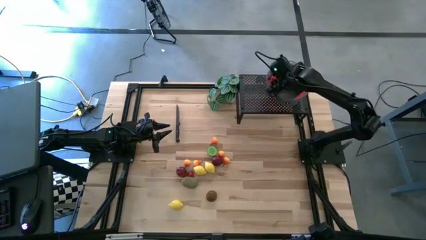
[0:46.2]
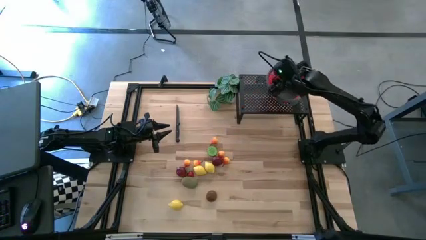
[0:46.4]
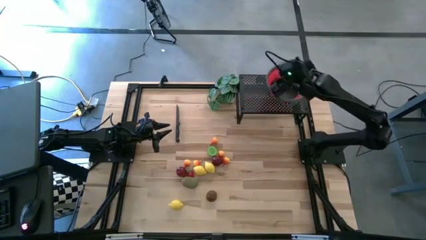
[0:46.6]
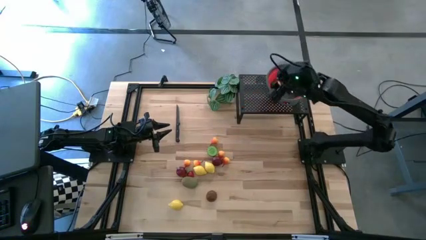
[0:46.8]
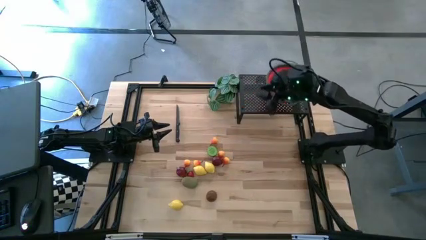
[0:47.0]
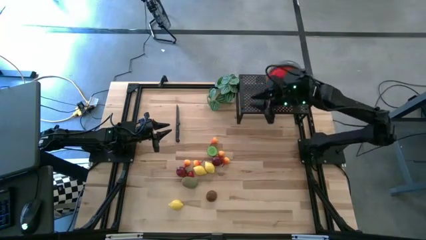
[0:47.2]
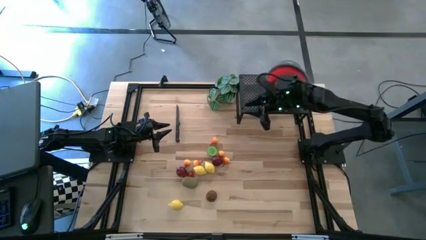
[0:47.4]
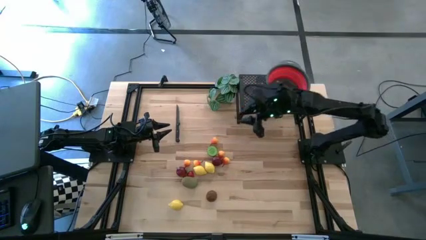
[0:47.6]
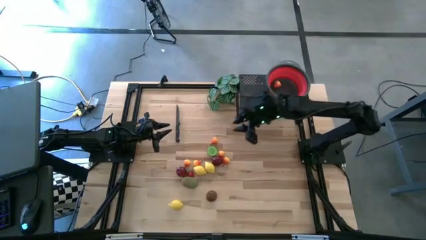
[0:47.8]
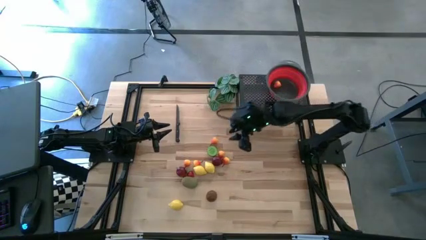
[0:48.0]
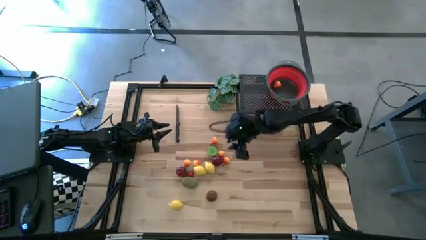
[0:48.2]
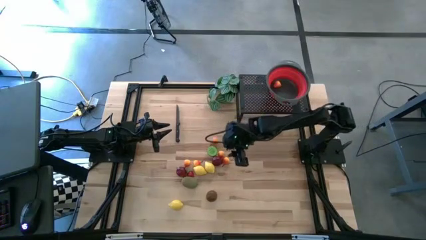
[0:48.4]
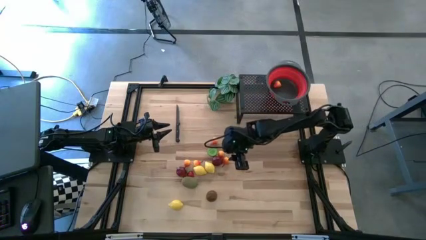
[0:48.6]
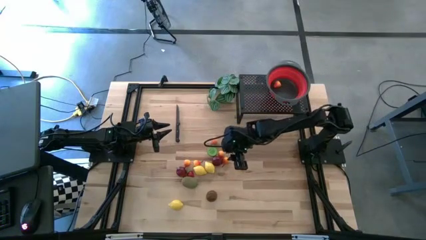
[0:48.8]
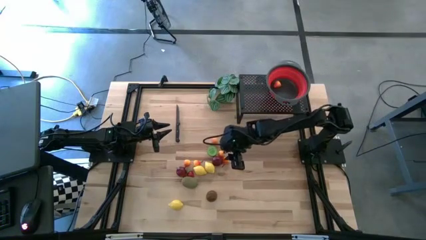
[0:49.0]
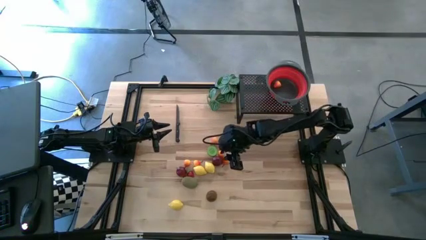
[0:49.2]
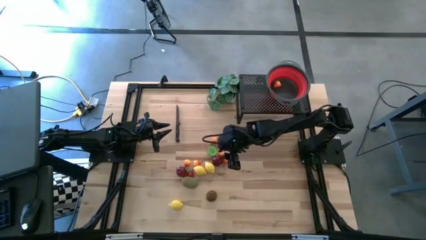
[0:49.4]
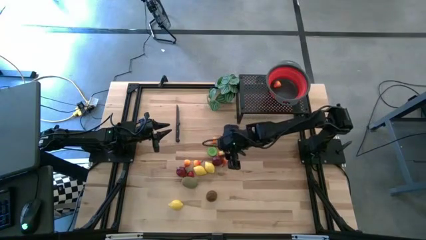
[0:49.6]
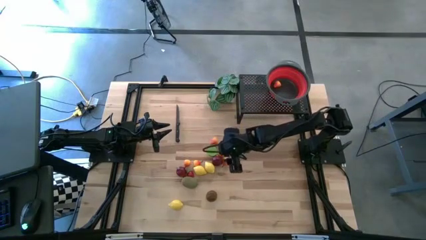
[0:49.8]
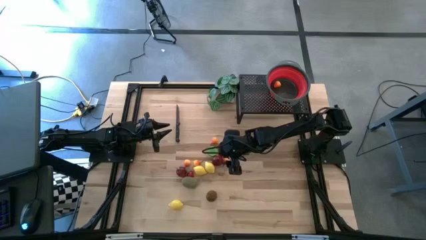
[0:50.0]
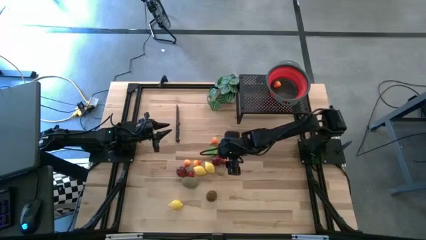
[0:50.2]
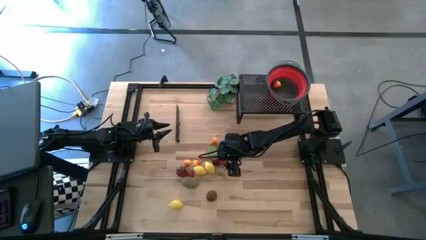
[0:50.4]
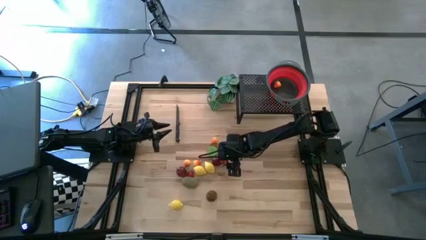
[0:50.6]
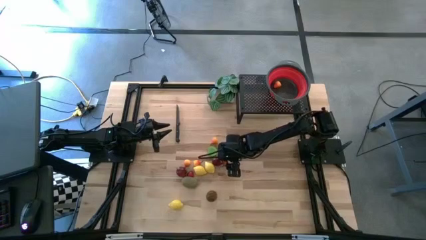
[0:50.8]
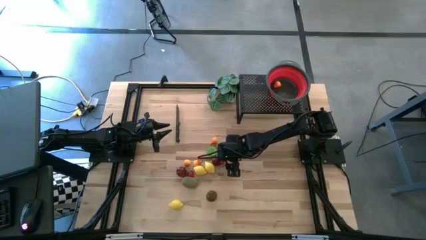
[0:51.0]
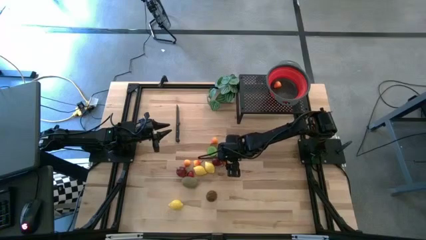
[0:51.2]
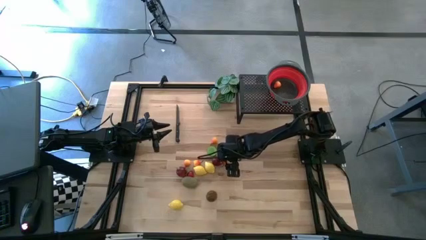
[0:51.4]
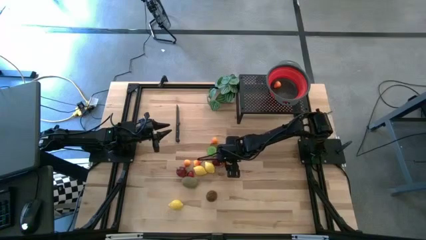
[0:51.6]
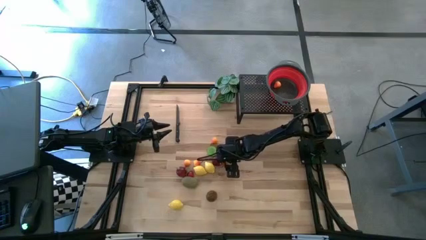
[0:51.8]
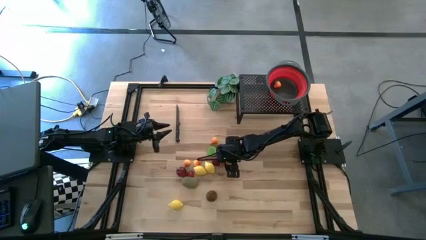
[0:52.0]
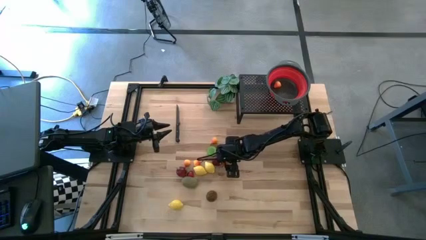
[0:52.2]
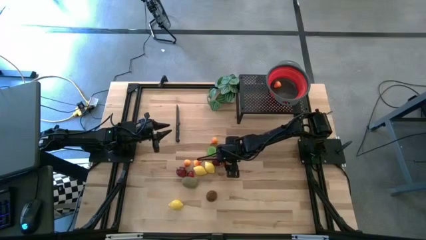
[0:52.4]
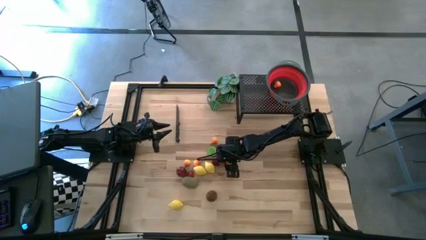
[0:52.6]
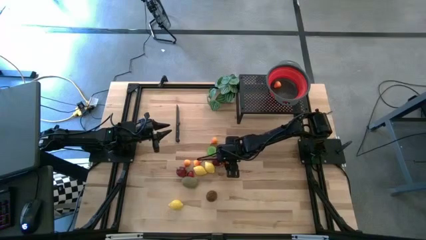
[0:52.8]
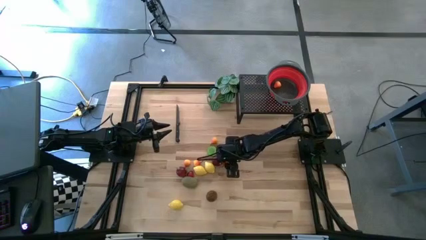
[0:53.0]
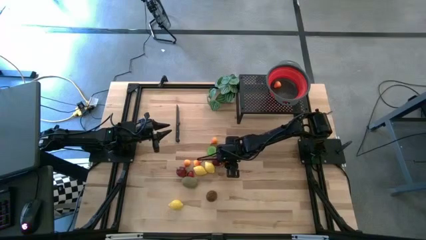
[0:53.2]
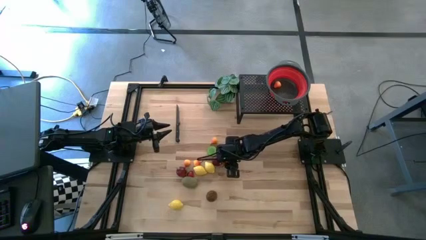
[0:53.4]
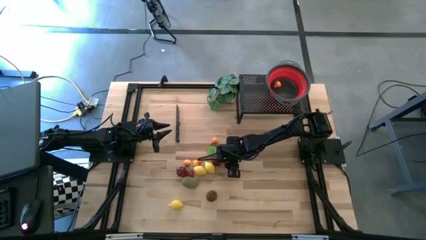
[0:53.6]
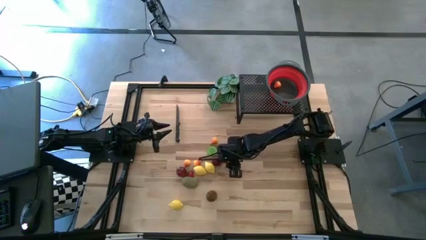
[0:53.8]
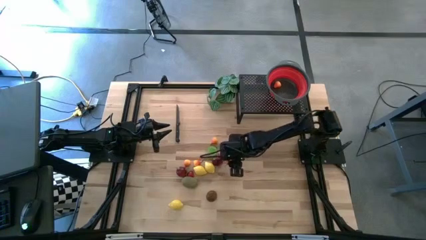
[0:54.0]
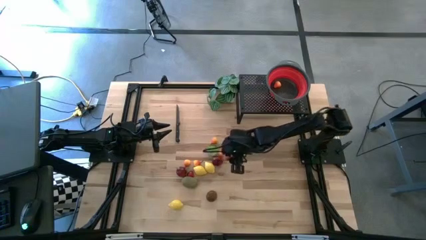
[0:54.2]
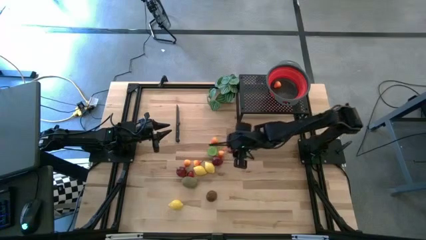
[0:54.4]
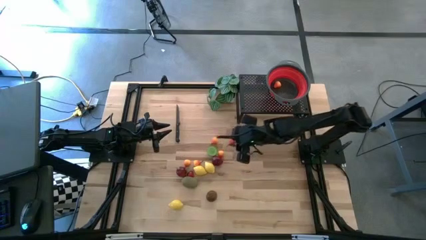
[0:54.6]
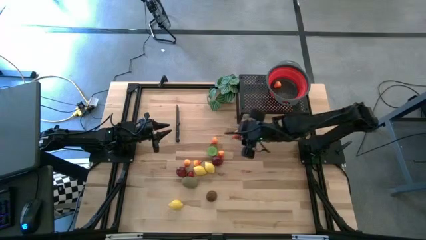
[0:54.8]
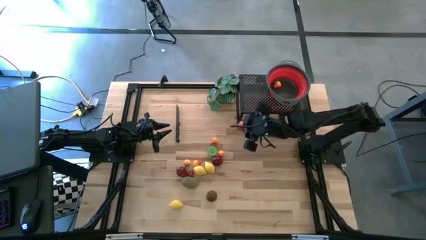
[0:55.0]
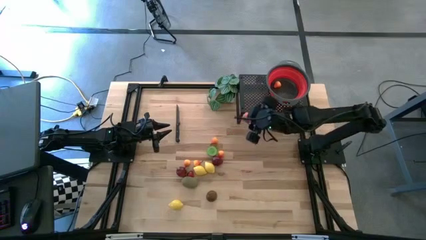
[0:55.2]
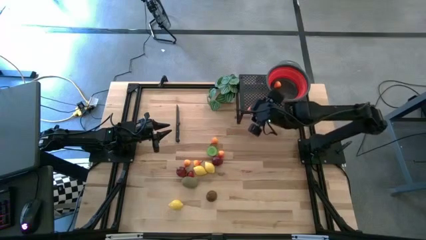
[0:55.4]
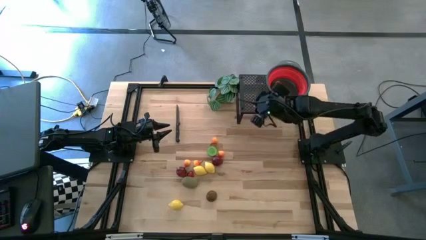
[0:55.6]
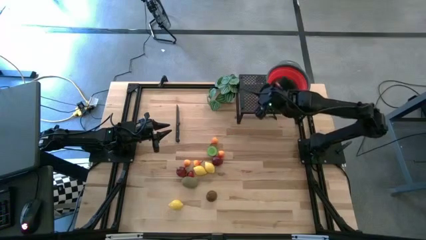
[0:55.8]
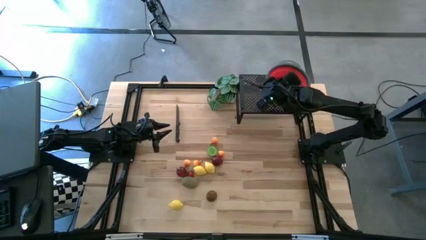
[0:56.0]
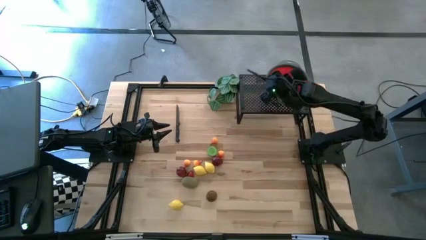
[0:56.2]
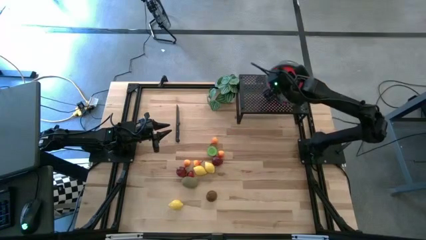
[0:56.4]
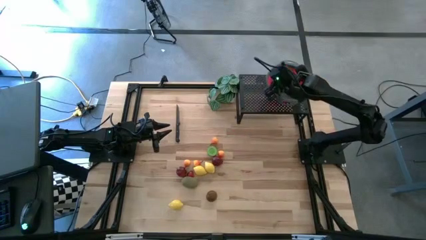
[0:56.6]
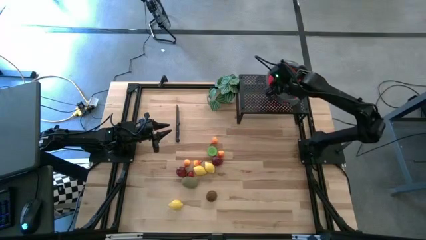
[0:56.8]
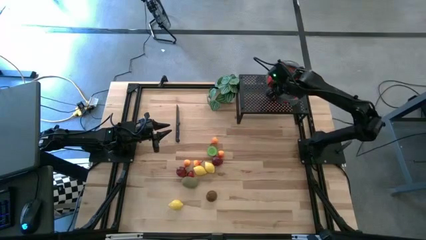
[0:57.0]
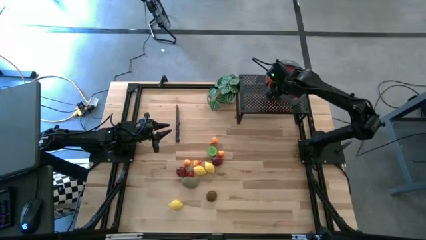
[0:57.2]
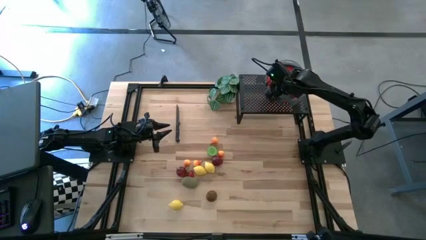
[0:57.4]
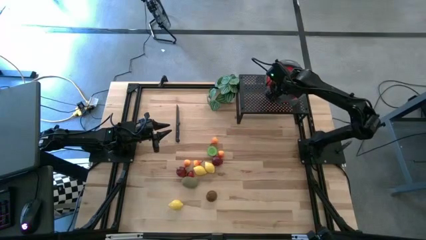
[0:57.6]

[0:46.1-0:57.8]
Task: Pick & Place Fruit
Put the orange pear into the red strainer bowl

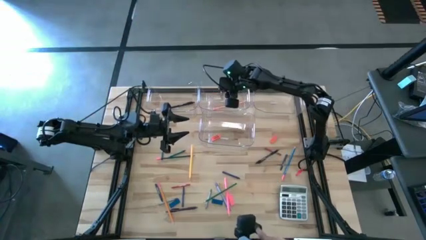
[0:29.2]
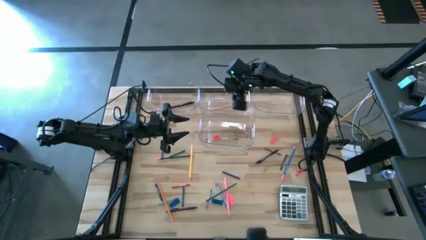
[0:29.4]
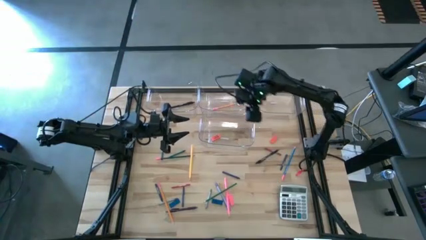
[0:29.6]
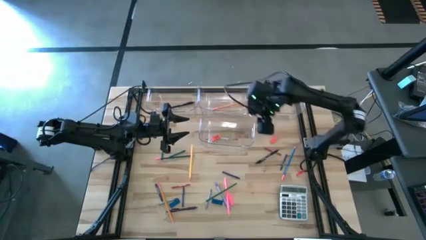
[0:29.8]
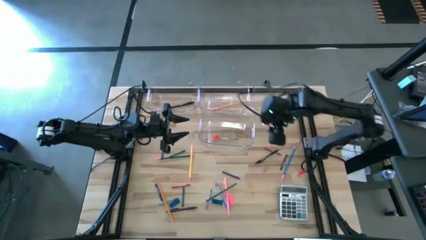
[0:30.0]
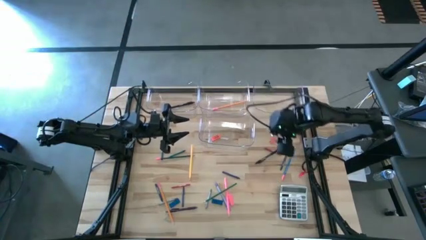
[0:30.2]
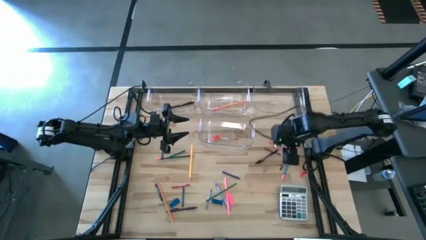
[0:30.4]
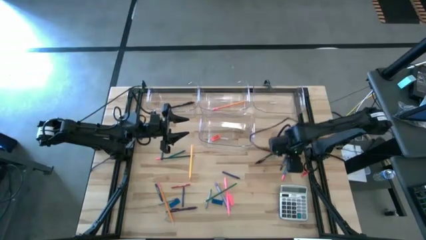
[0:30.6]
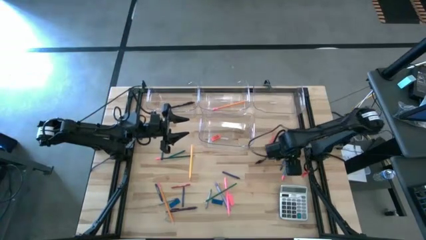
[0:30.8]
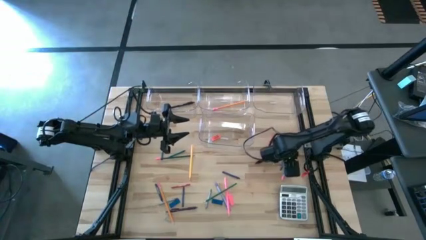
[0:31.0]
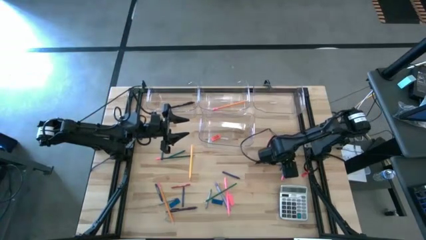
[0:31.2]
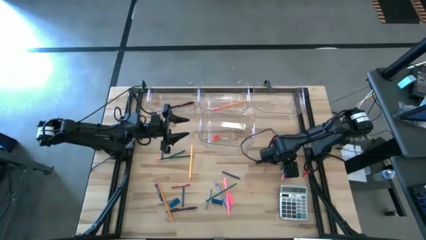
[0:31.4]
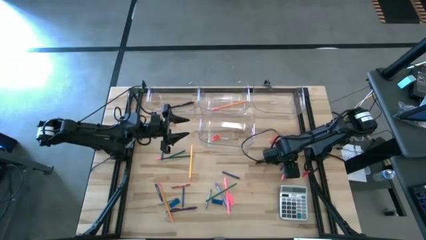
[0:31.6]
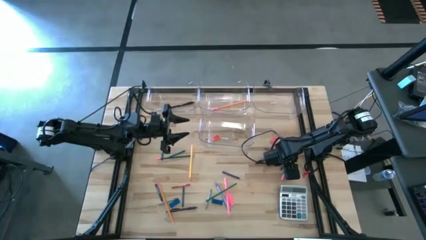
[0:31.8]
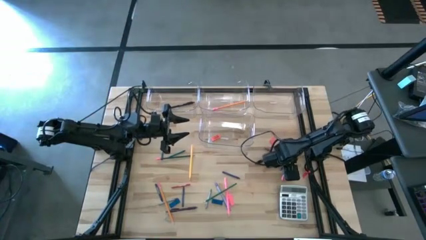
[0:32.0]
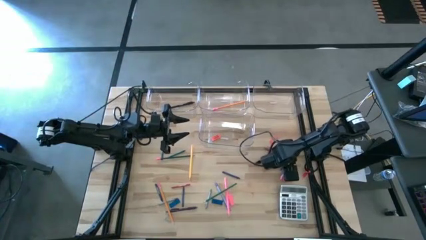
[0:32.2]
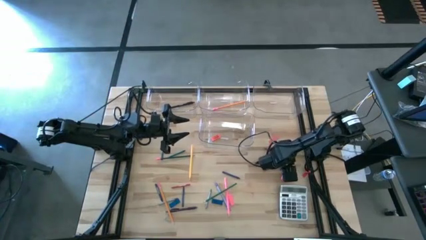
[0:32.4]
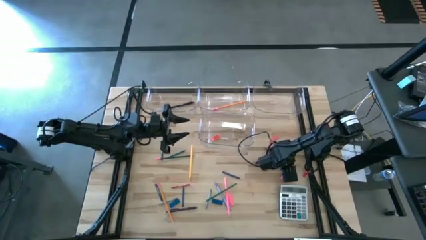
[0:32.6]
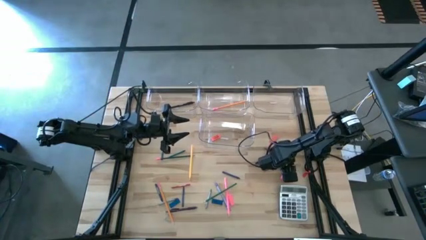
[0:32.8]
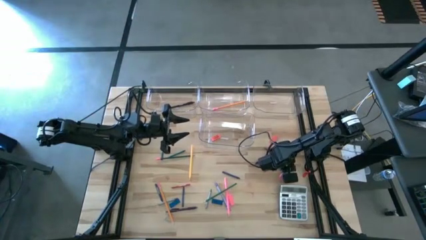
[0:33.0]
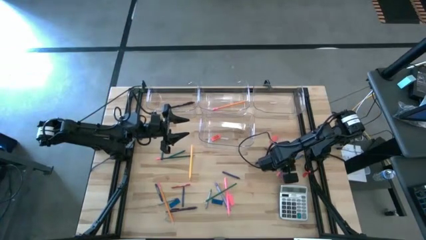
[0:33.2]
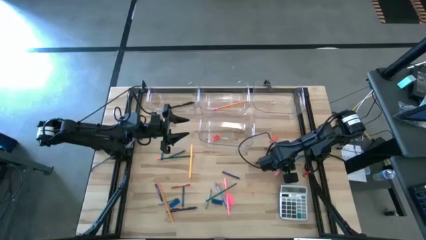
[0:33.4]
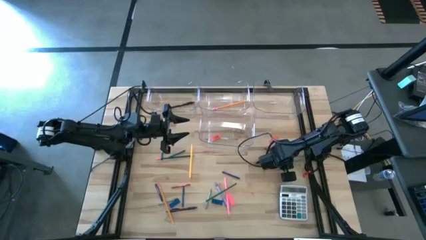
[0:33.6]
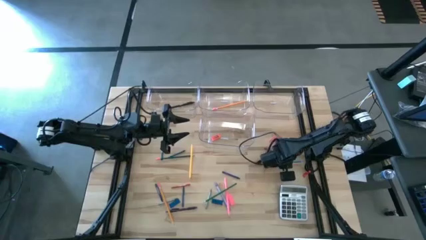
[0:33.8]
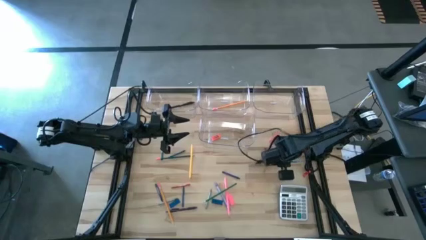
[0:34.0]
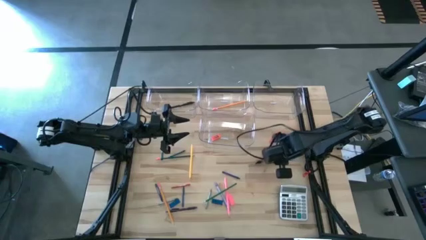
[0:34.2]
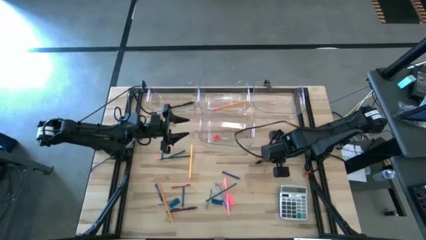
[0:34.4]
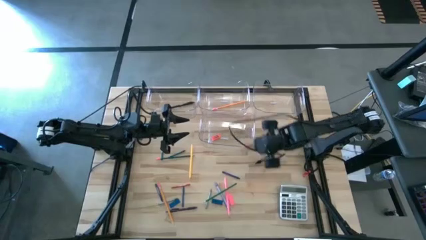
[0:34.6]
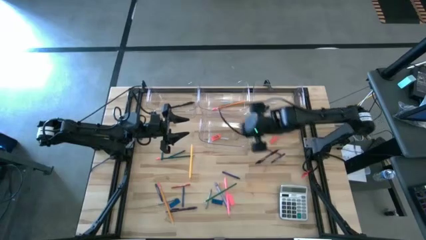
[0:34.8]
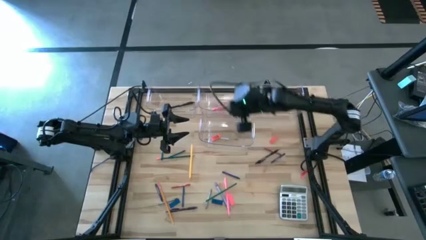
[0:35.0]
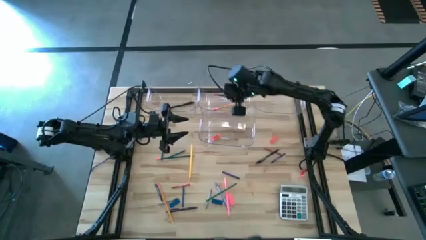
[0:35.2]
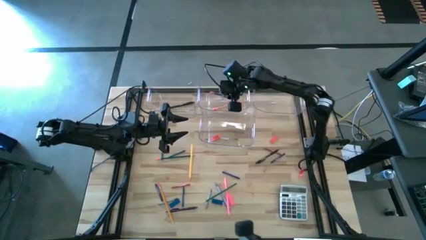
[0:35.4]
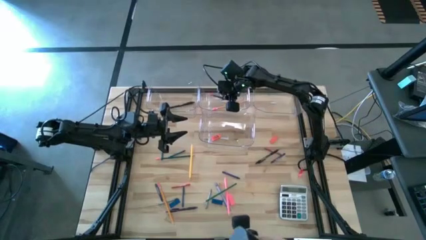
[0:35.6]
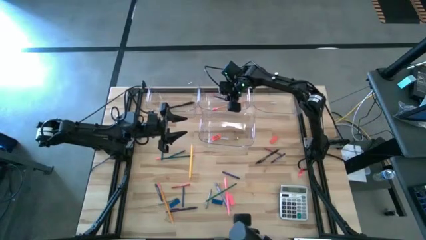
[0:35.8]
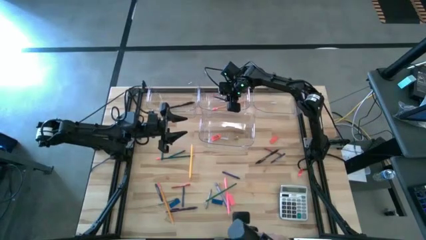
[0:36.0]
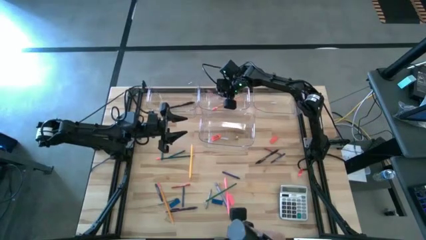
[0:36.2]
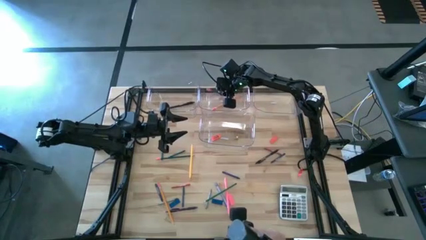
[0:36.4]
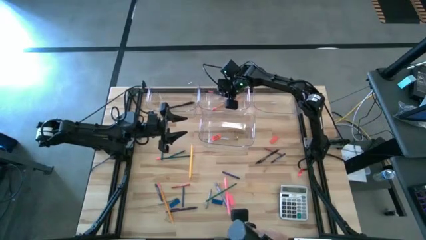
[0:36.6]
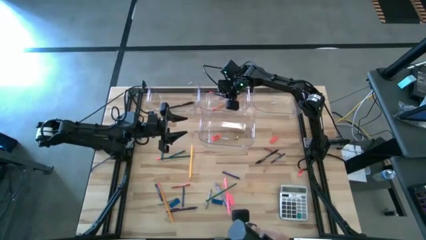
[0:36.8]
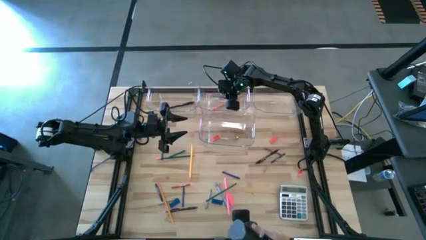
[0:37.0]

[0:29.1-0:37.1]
Task: Sort crayons/erasers/pens/pencils in bins
Put the blue pencil into the top center transparent bin
